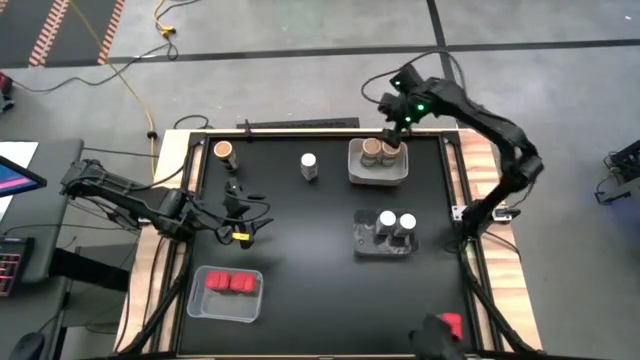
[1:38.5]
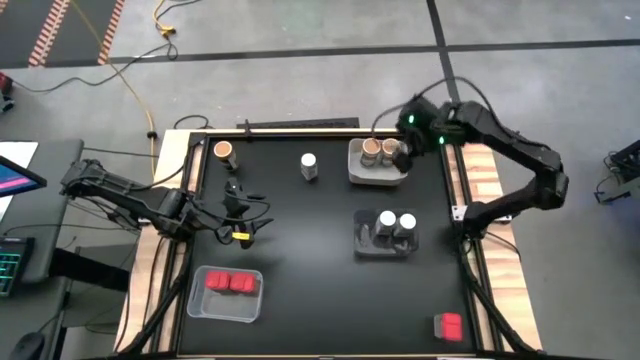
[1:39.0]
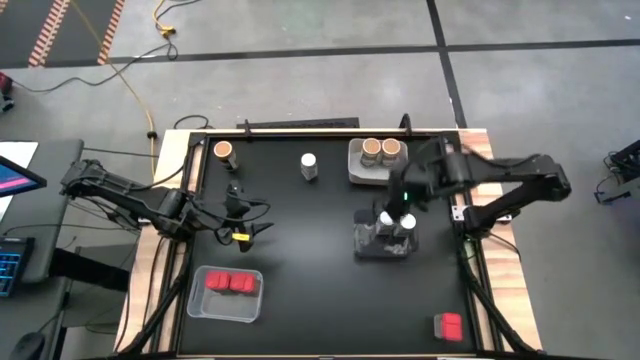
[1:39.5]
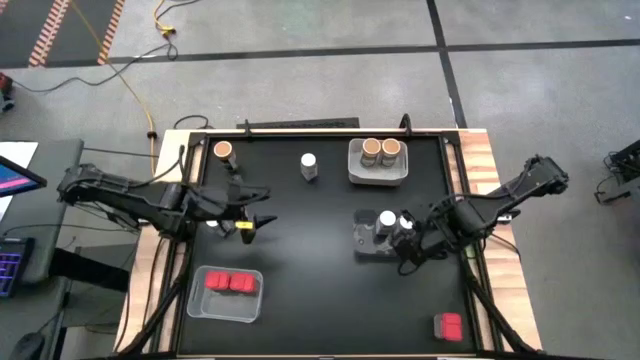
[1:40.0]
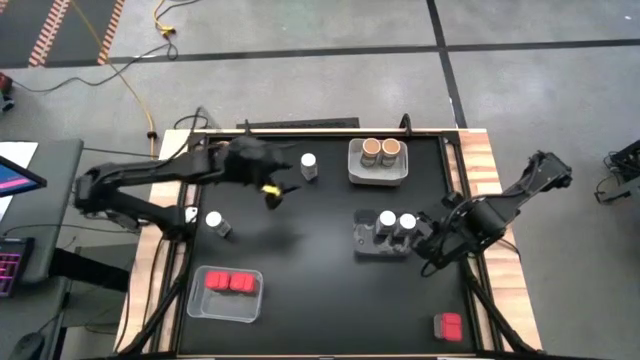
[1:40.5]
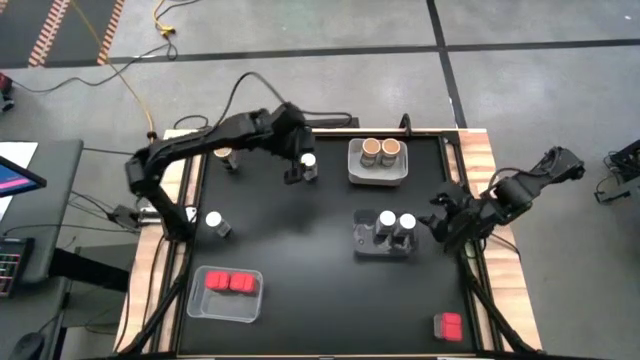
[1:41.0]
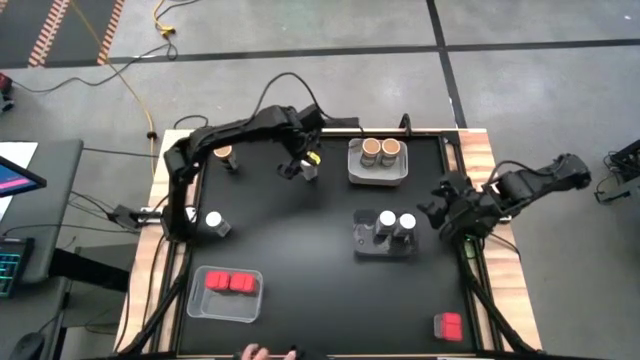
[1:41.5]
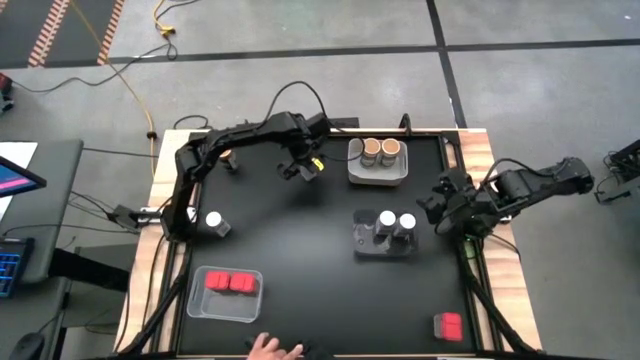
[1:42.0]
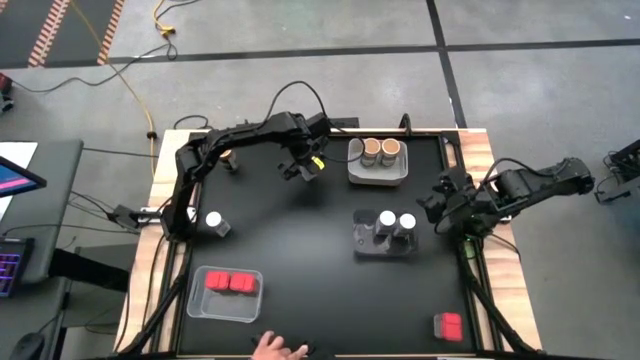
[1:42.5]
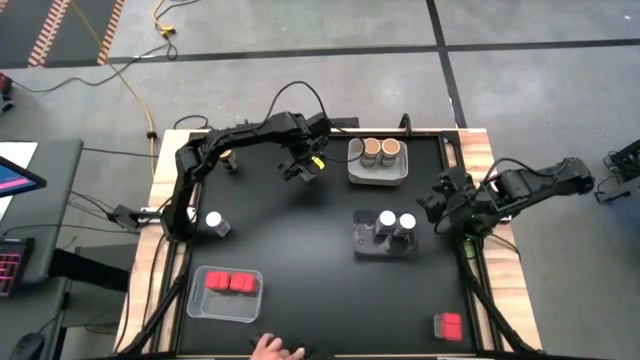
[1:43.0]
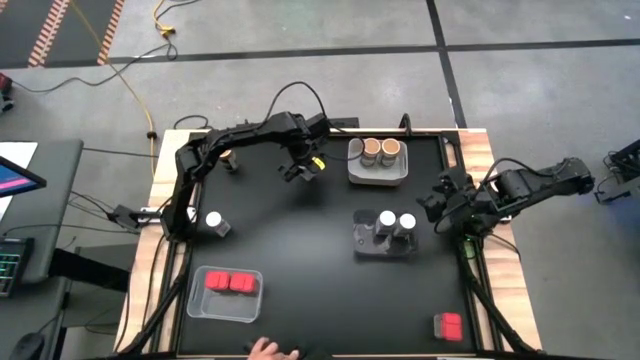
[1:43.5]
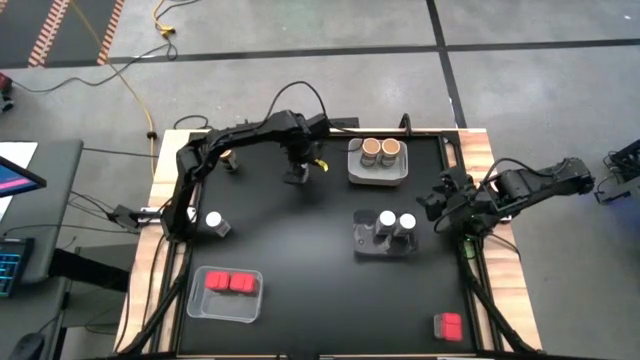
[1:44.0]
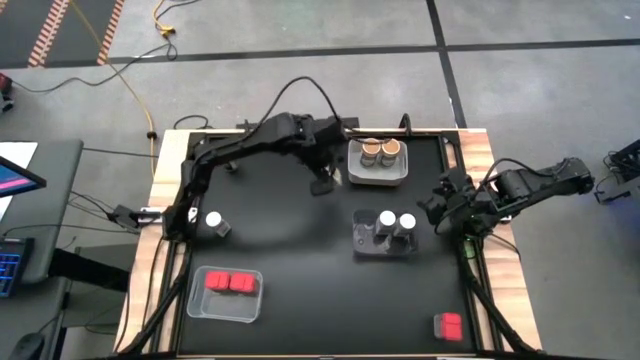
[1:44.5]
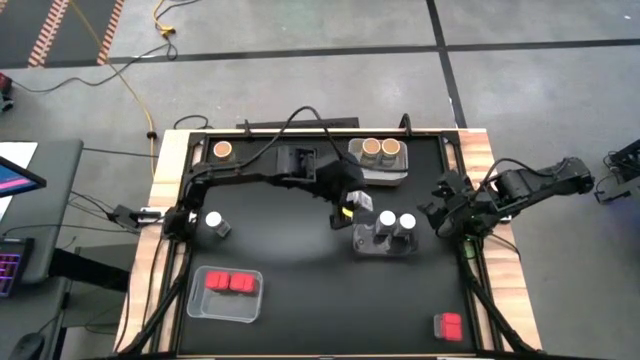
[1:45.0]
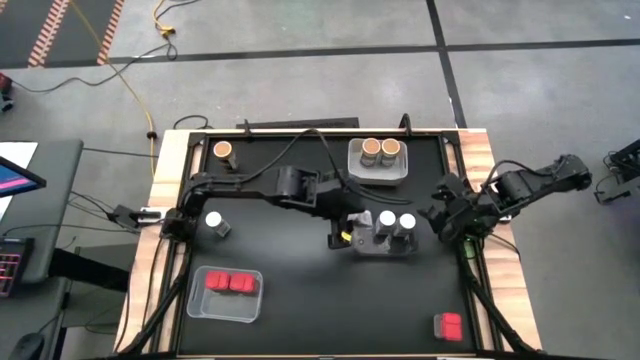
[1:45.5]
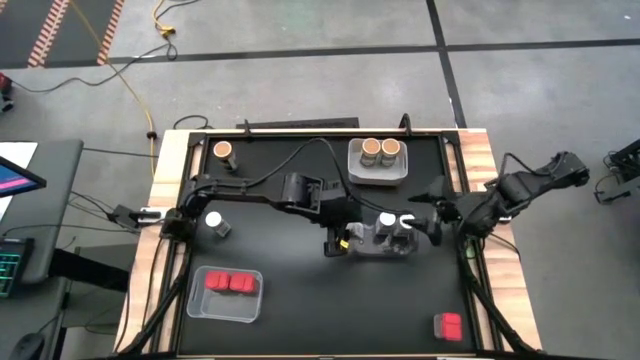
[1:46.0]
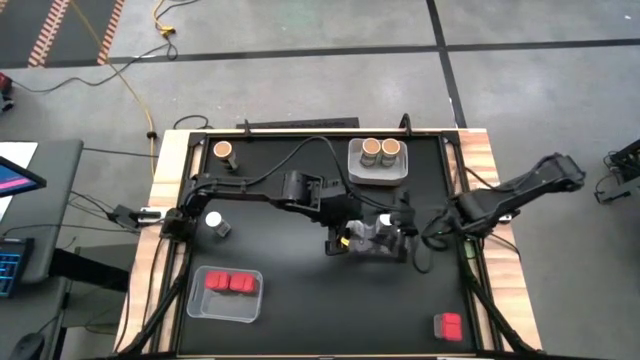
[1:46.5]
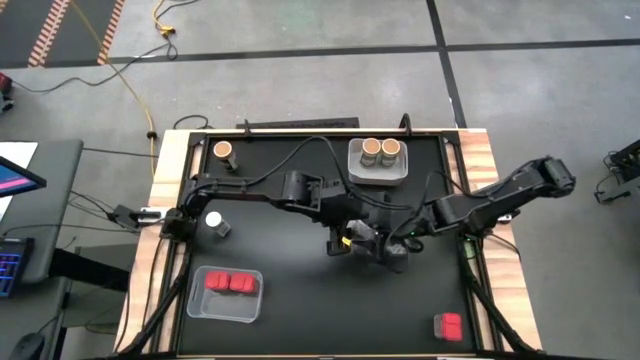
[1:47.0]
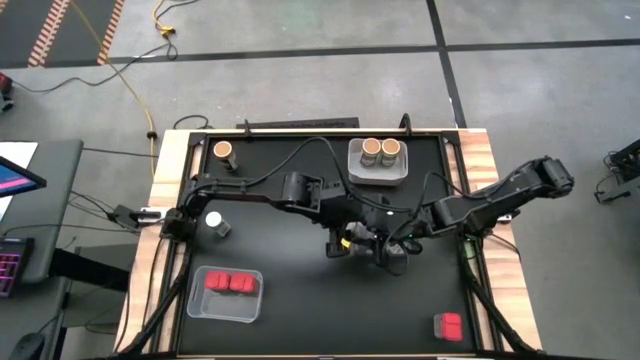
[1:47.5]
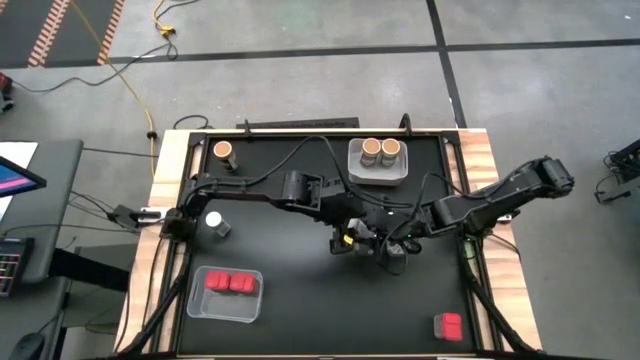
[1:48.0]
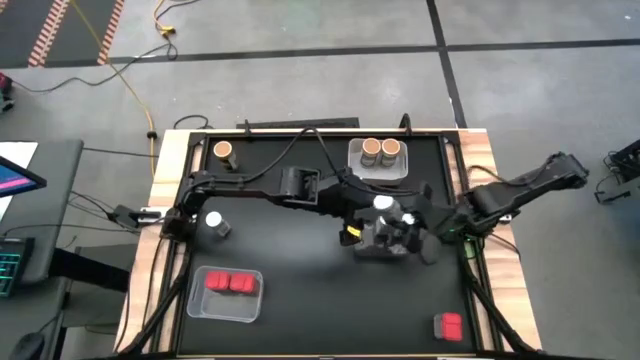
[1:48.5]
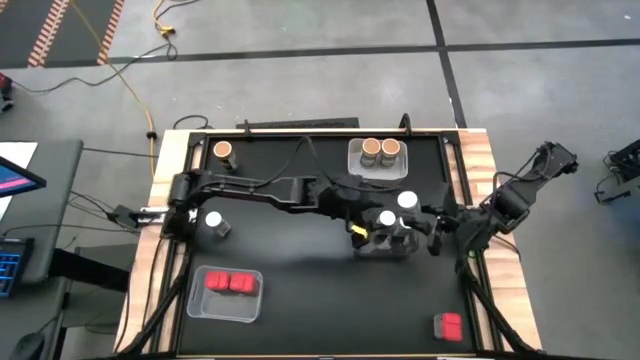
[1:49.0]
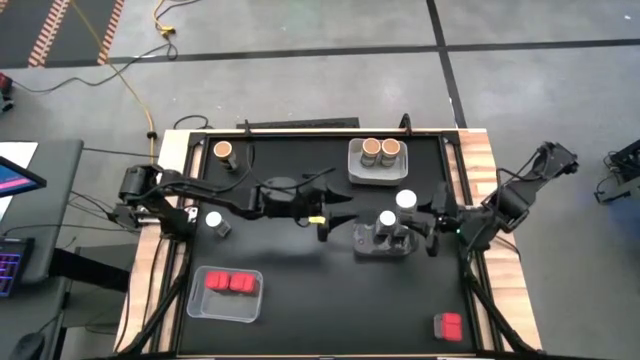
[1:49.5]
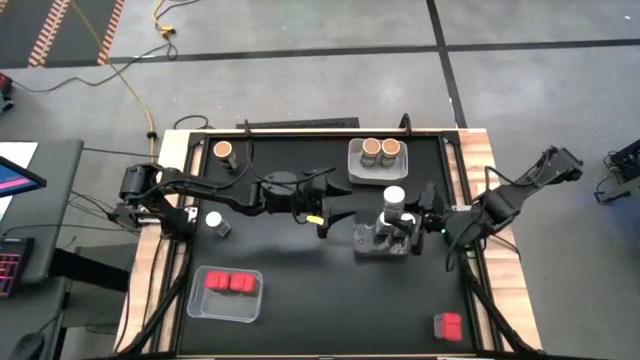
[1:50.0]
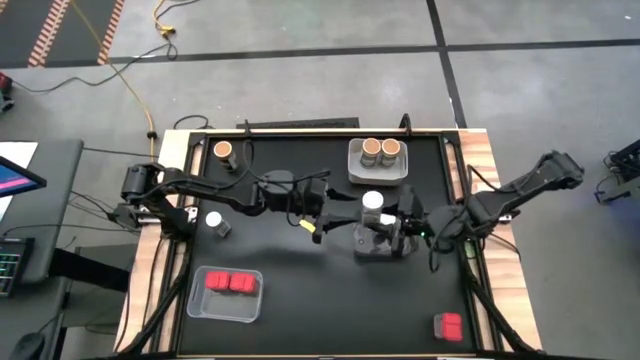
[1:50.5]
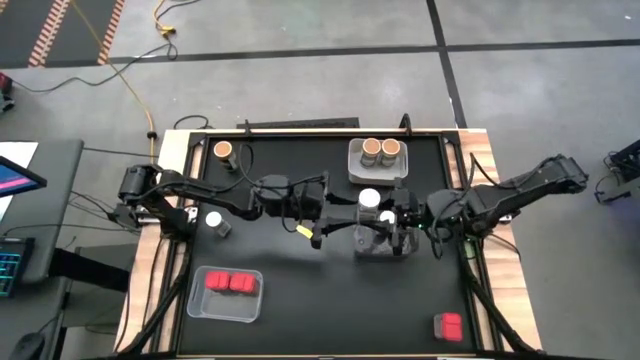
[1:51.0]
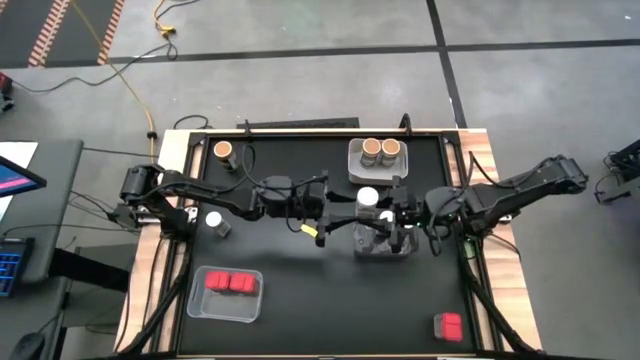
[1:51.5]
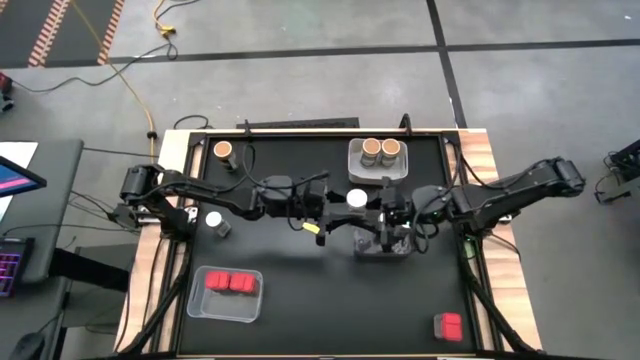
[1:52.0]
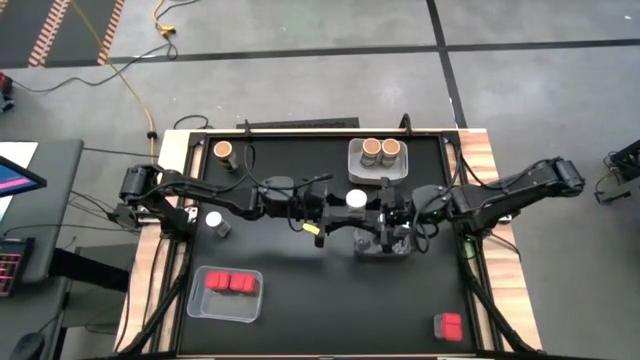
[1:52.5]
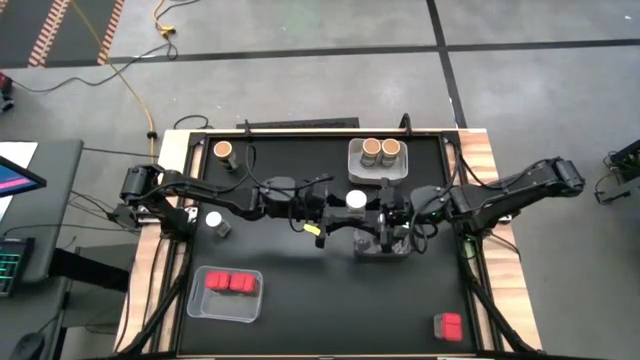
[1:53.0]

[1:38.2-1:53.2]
Task: Sort spices by type
Put the top white spice bottle in the black bin

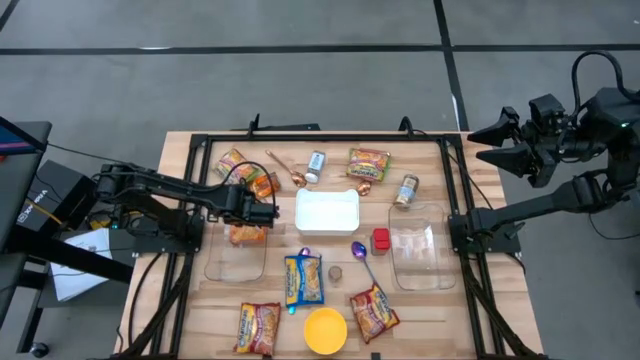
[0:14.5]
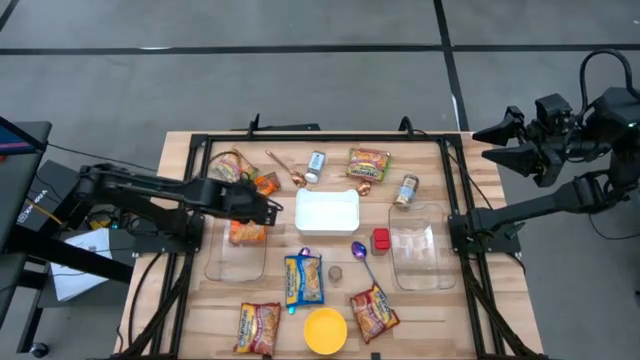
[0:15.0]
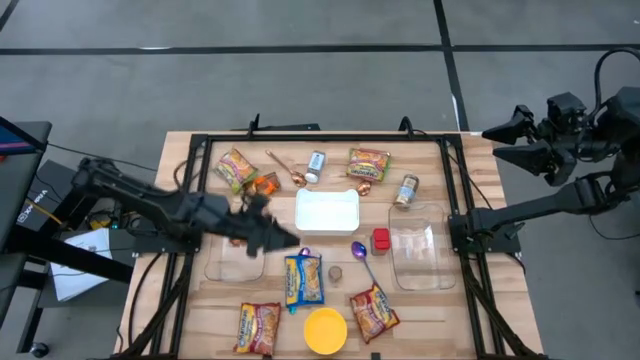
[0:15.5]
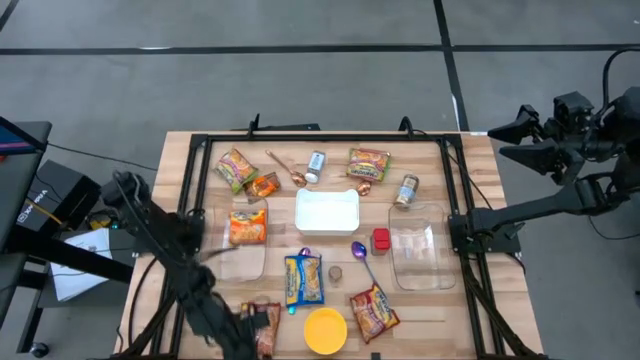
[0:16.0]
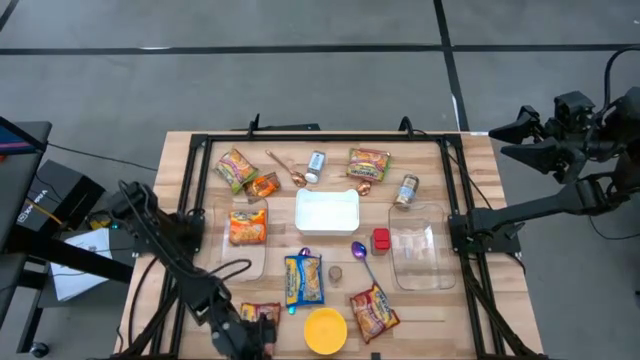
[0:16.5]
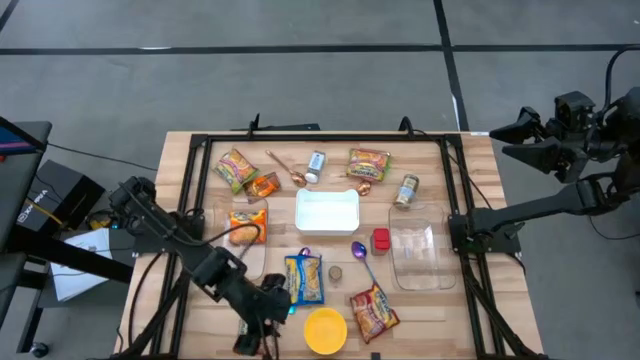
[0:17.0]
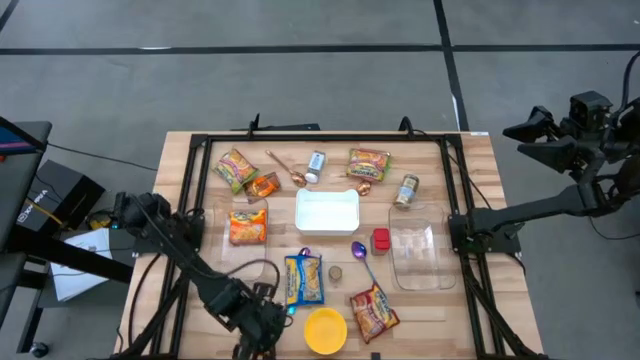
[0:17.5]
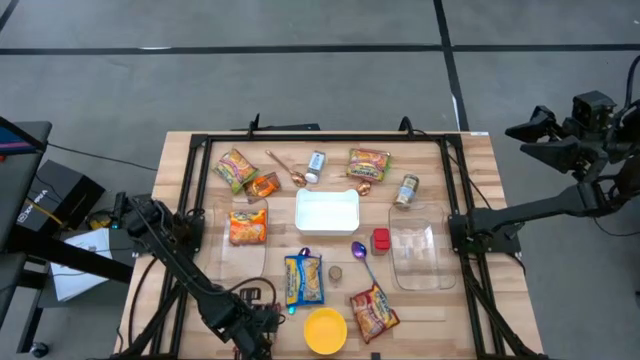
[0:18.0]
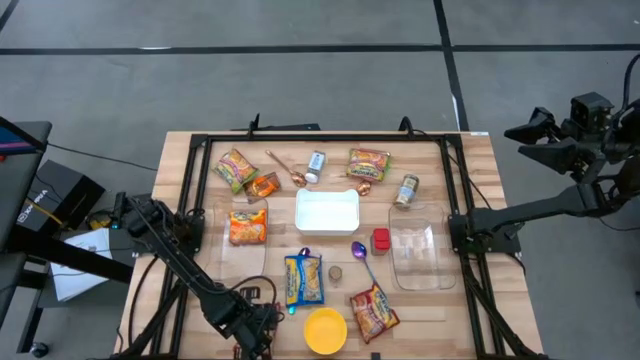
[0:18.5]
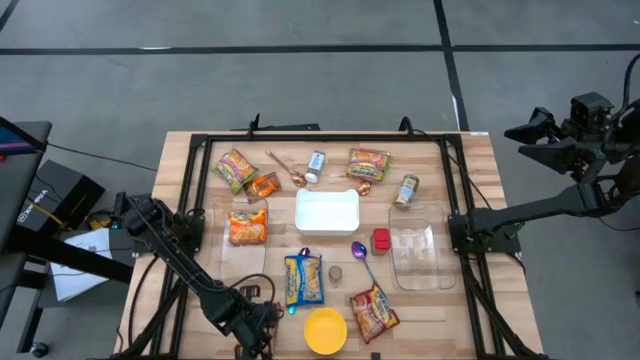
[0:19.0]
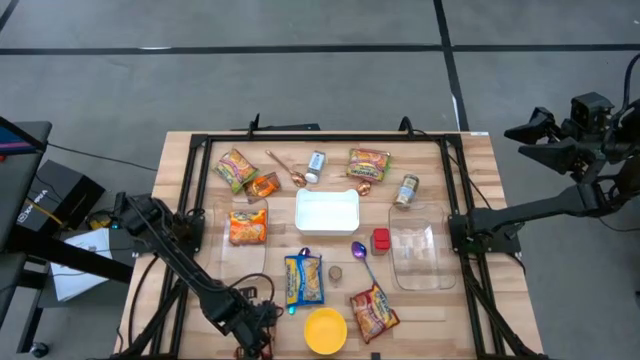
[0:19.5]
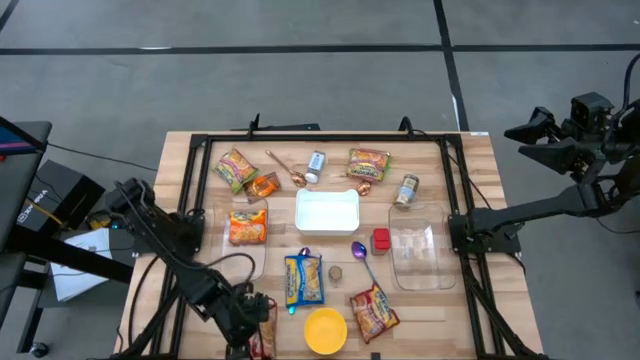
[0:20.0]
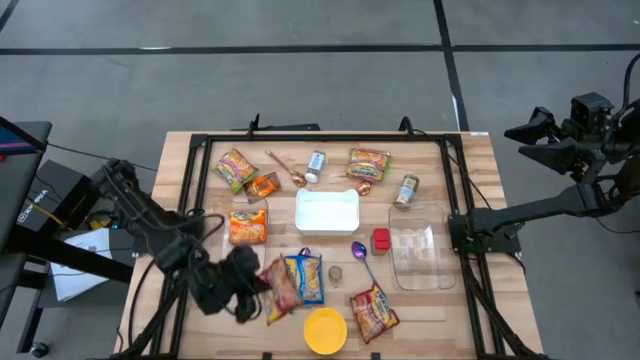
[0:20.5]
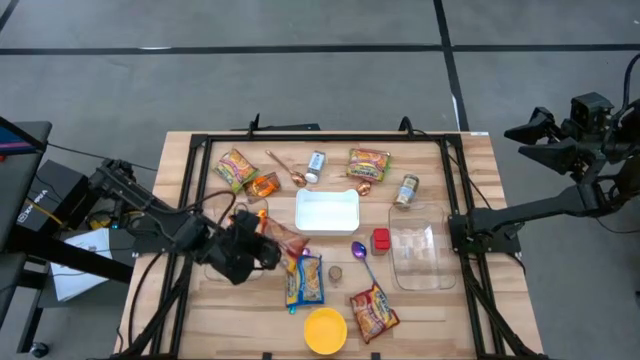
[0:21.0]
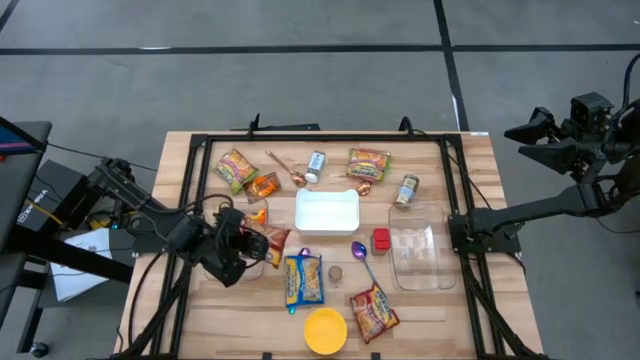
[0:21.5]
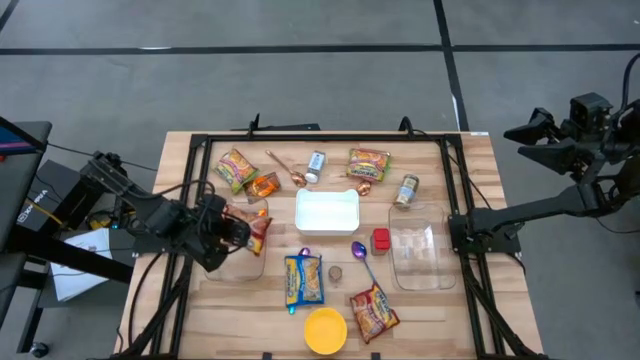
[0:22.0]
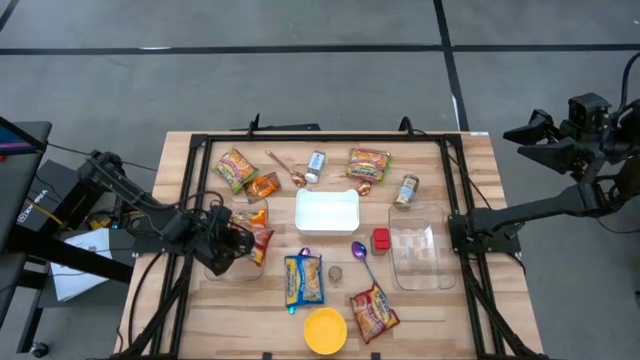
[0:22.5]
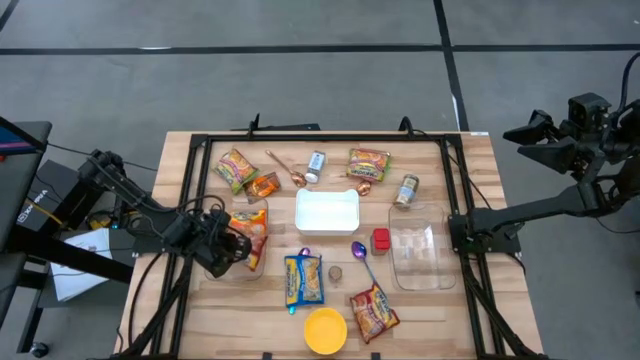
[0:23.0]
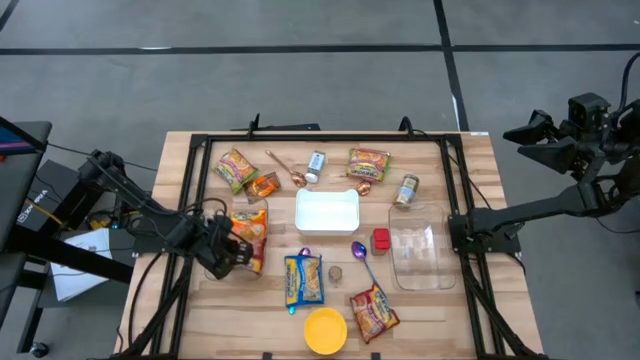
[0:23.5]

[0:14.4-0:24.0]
Task: Pick & Place Food Item
Put the left red noodle pack into the left transparent bin
